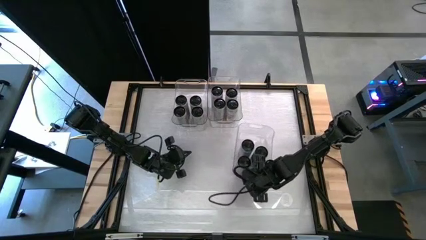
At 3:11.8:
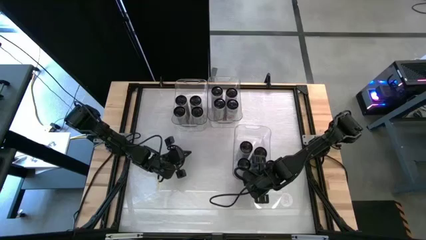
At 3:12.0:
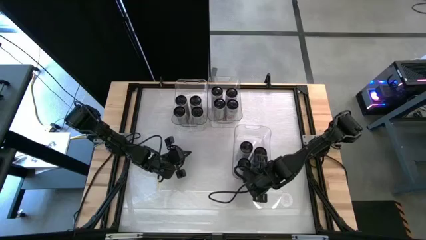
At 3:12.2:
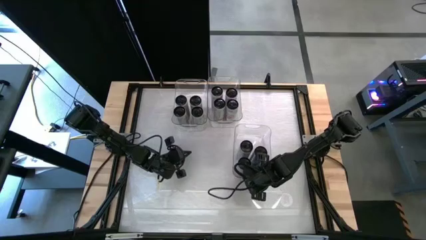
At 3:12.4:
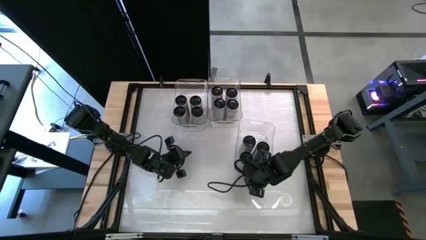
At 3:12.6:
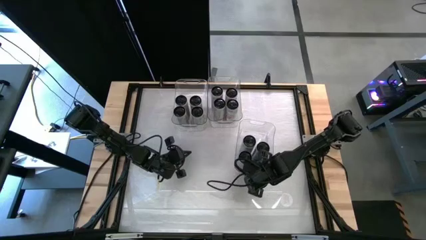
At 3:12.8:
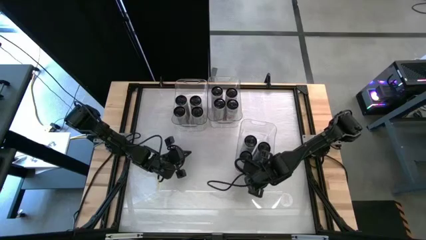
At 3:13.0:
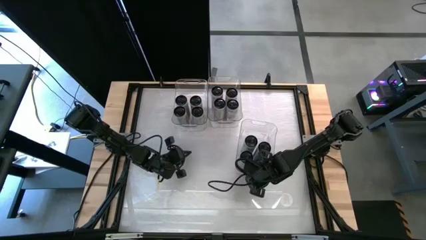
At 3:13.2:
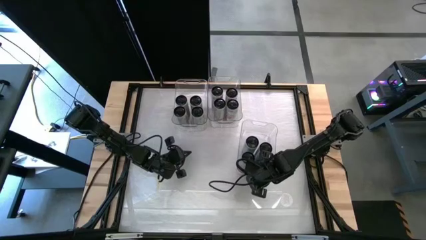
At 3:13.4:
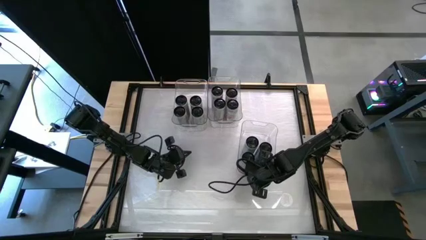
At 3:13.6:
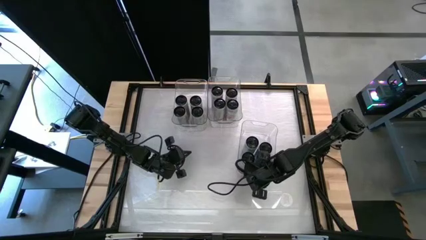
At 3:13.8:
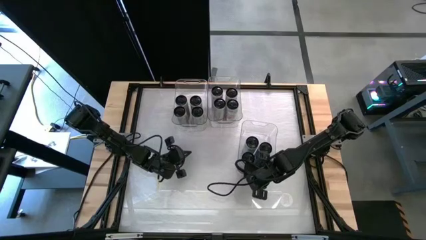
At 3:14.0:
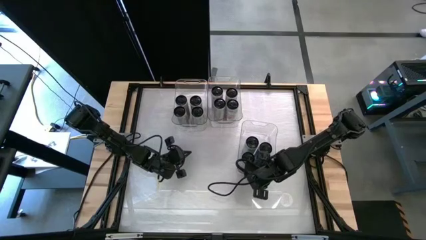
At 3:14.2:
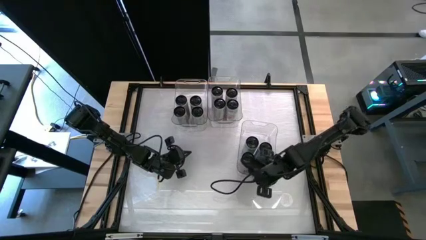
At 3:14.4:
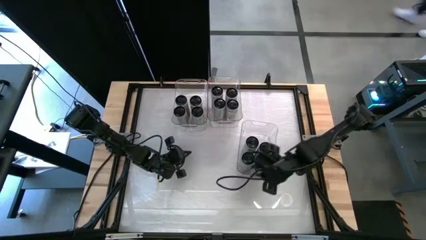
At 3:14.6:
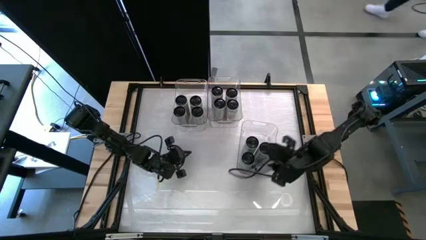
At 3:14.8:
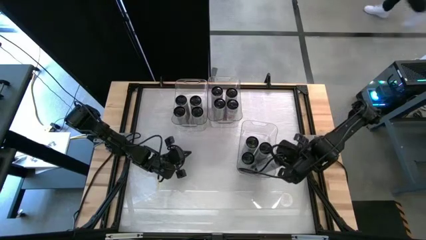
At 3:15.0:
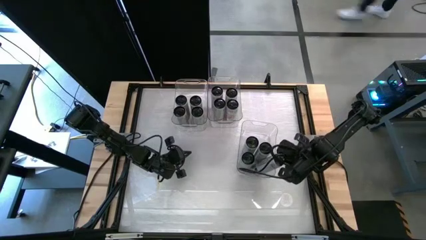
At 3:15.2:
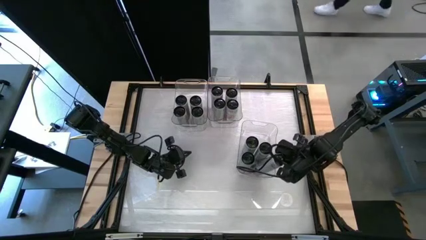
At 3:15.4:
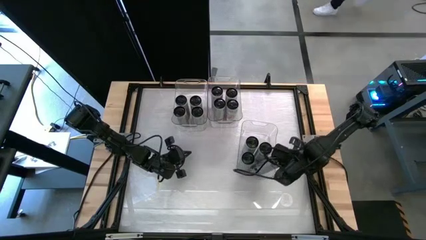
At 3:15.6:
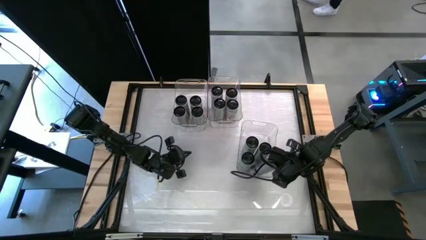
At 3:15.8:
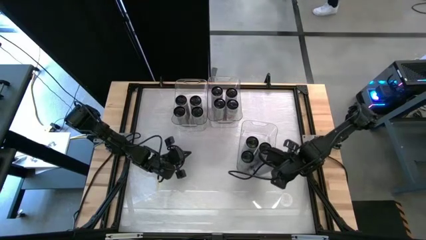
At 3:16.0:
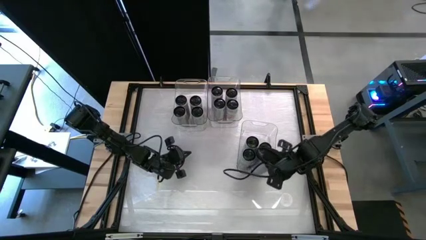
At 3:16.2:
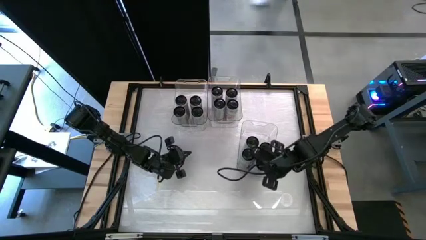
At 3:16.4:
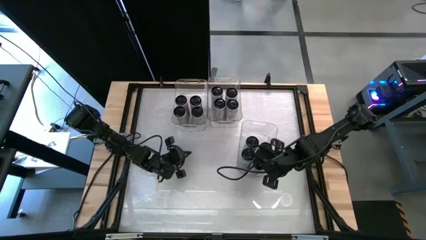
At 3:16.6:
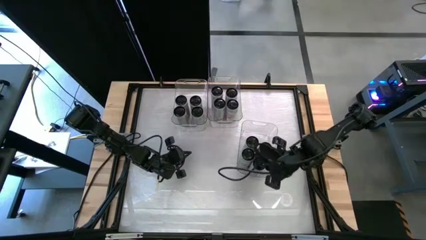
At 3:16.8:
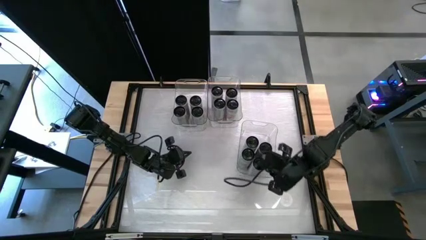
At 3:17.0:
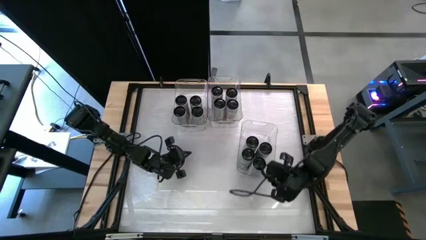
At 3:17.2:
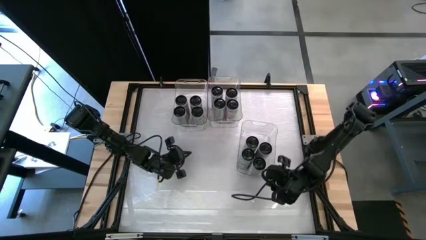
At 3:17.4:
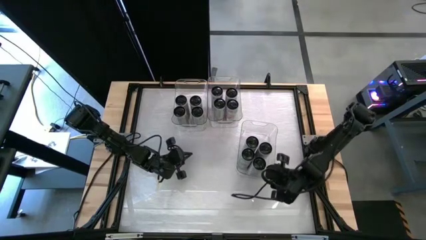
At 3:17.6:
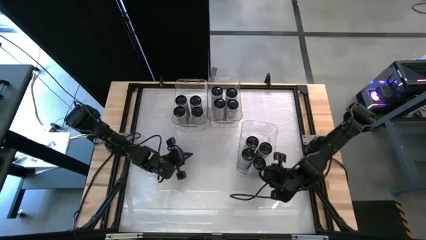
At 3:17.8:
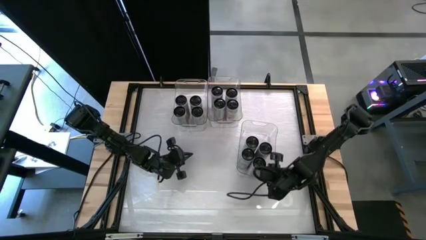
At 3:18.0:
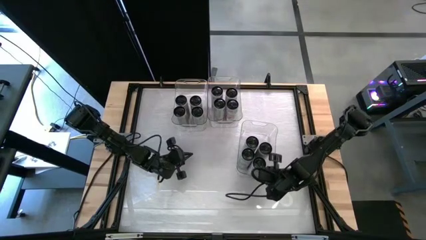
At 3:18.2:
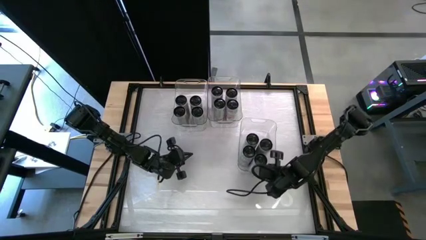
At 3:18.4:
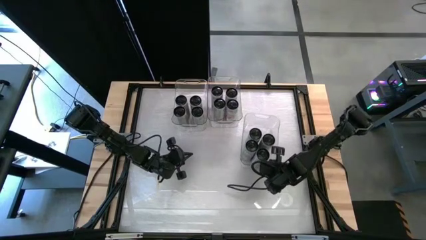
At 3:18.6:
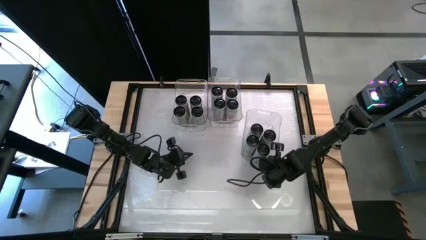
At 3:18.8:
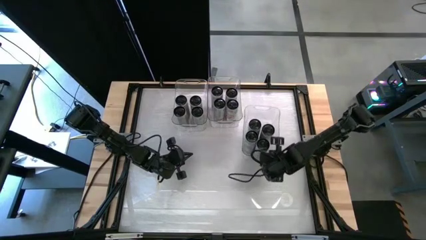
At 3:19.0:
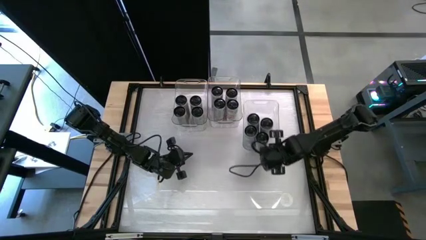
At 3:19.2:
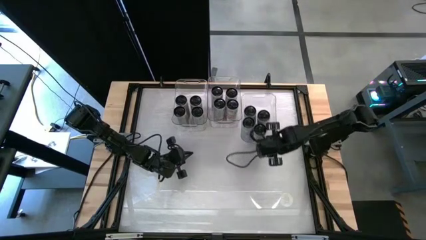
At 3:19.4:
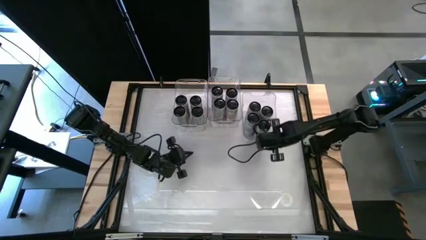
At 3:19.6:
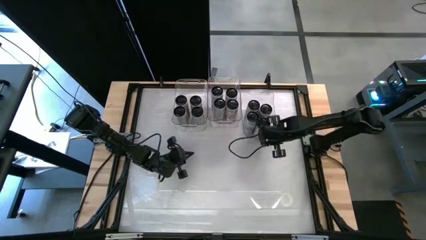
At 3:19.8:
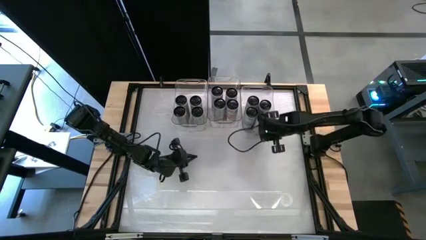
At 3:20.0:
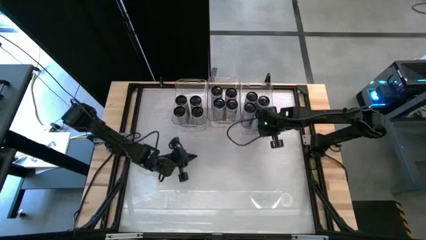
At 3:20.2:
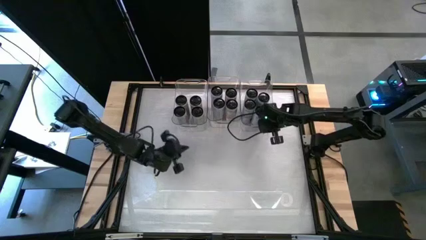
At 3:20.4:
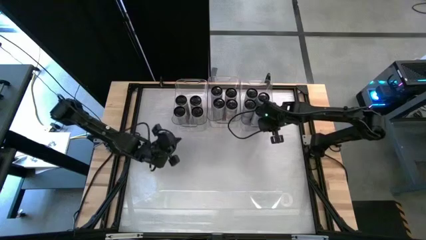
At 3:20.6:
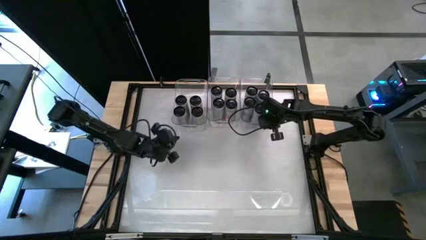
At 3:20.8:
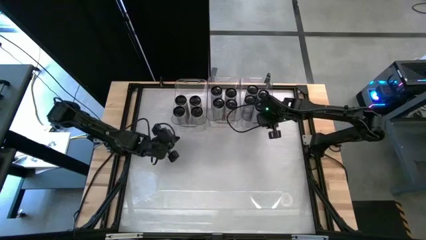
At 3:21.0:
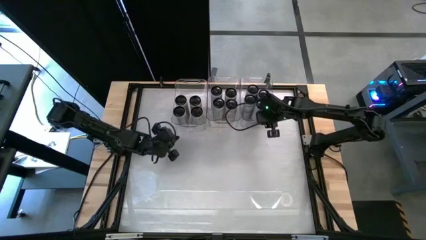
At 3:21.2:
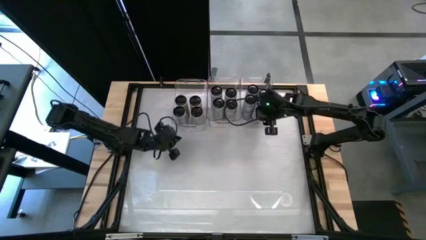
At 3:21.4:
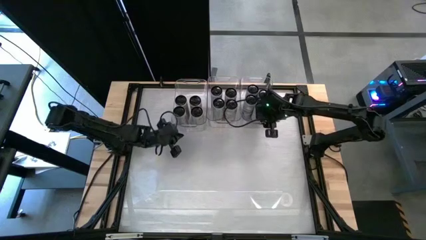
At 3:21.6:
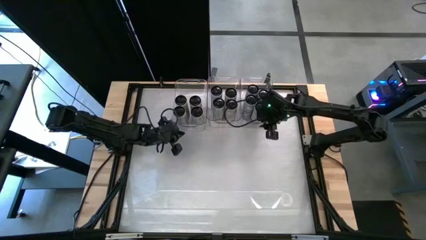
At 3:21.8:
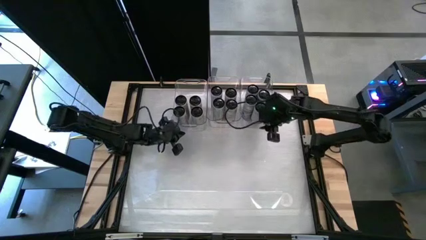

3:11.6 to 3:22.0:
Task: Sort soda cans
Adjust the right transparent bin

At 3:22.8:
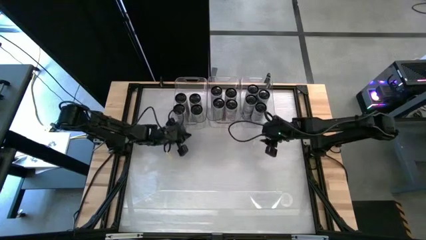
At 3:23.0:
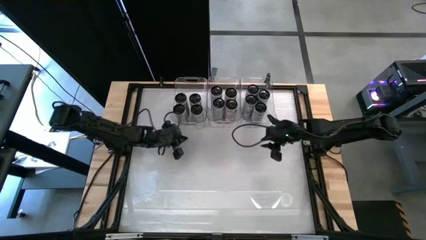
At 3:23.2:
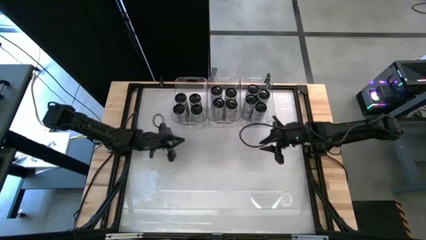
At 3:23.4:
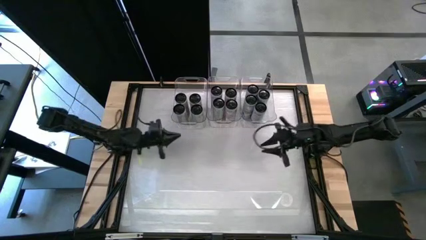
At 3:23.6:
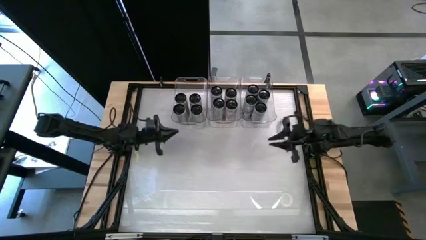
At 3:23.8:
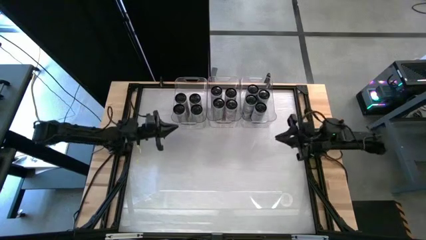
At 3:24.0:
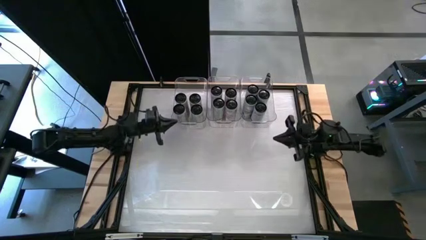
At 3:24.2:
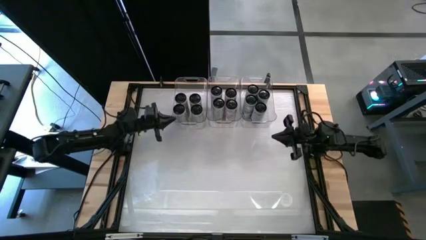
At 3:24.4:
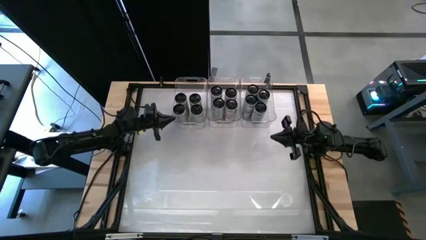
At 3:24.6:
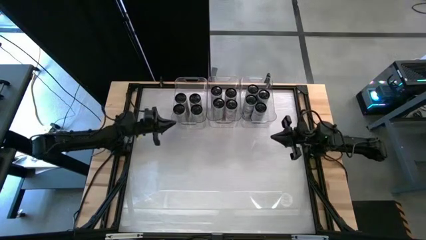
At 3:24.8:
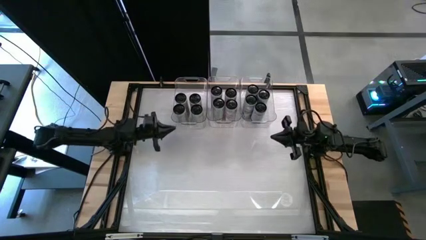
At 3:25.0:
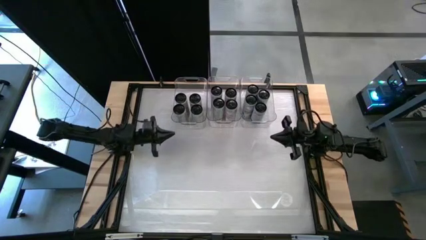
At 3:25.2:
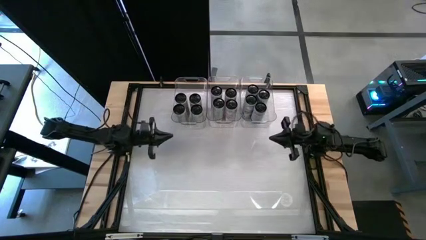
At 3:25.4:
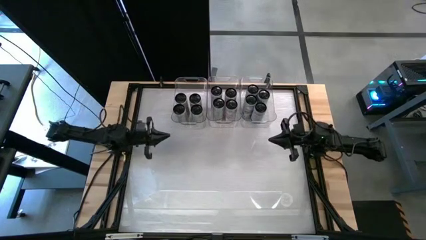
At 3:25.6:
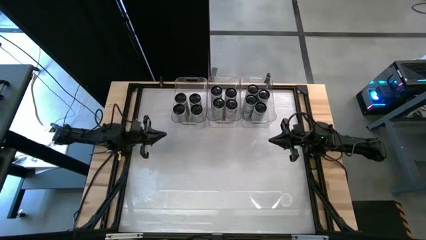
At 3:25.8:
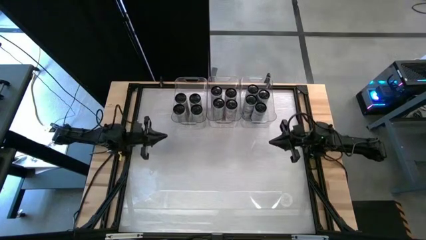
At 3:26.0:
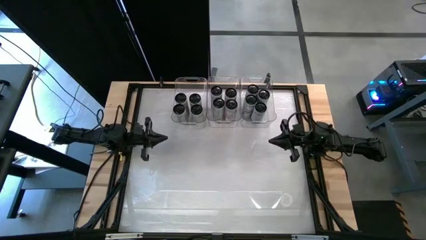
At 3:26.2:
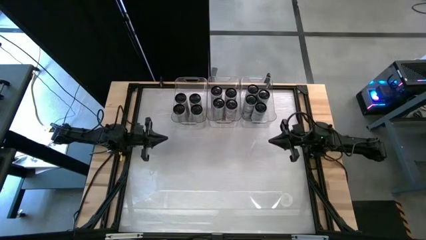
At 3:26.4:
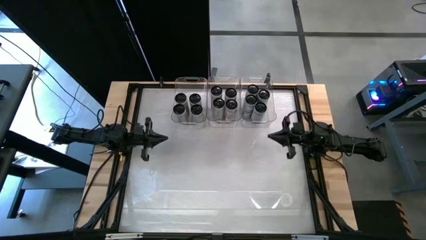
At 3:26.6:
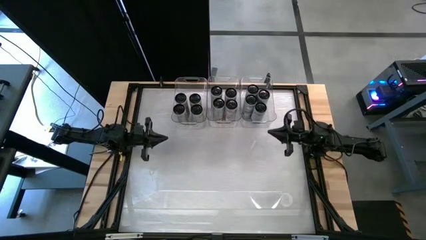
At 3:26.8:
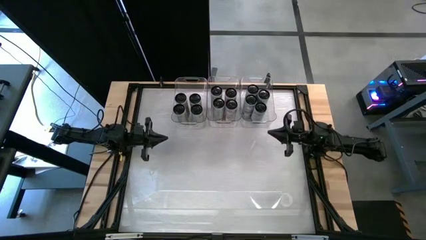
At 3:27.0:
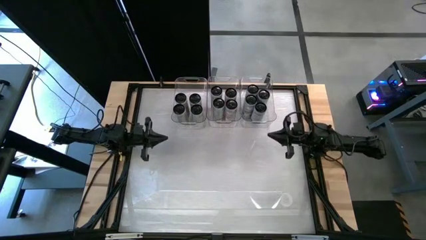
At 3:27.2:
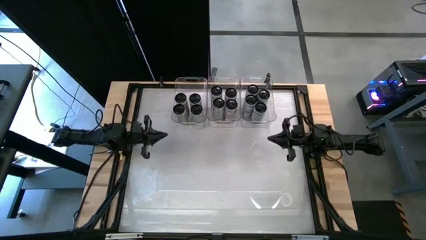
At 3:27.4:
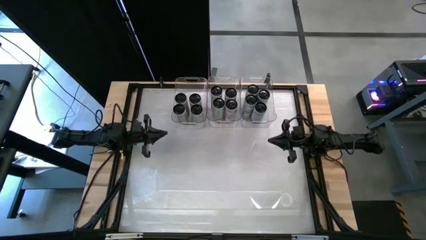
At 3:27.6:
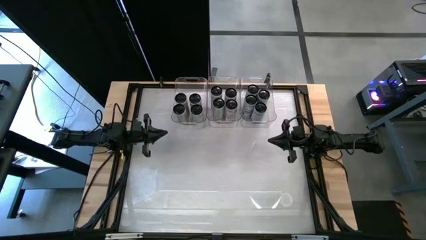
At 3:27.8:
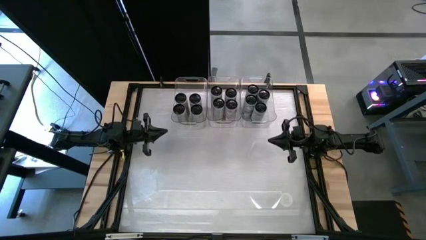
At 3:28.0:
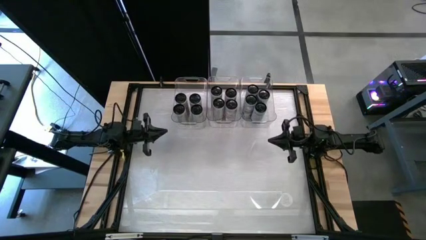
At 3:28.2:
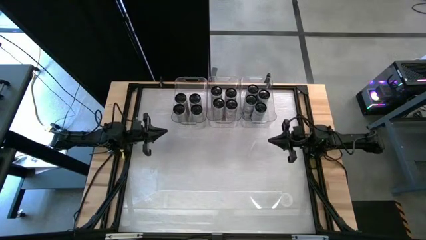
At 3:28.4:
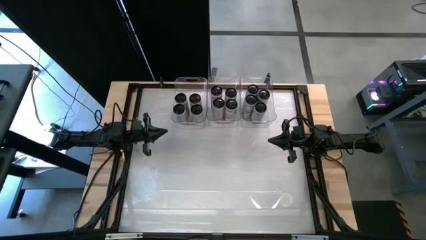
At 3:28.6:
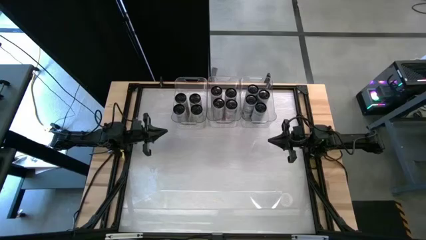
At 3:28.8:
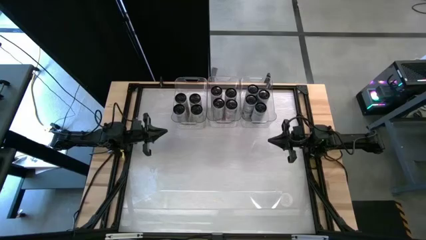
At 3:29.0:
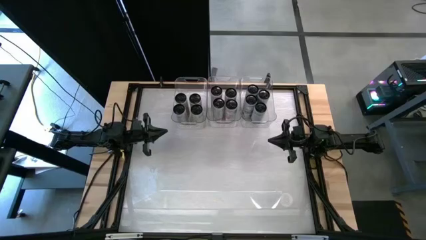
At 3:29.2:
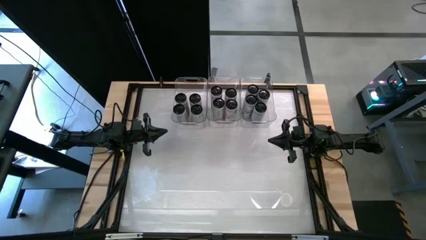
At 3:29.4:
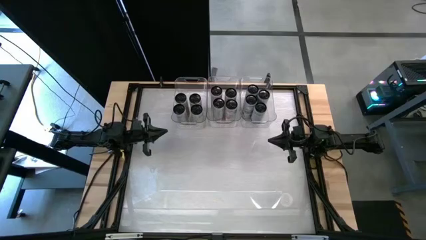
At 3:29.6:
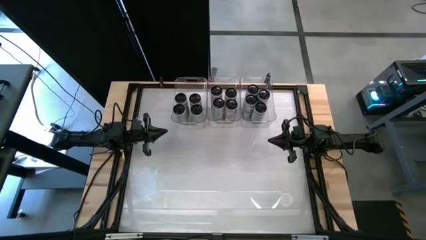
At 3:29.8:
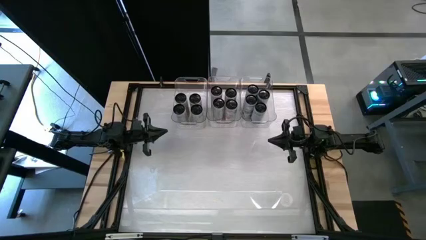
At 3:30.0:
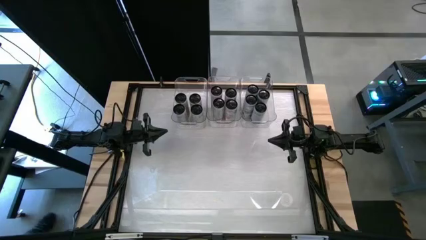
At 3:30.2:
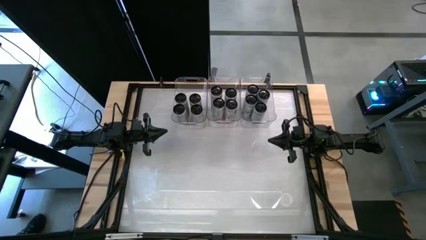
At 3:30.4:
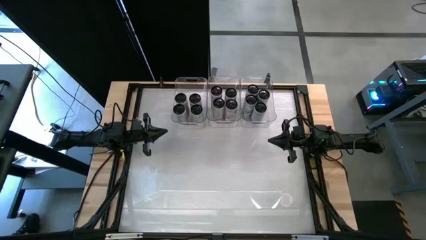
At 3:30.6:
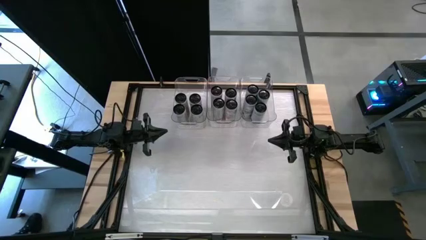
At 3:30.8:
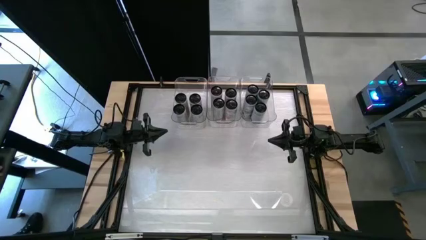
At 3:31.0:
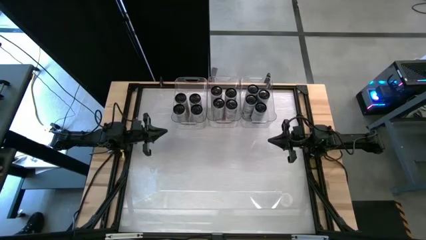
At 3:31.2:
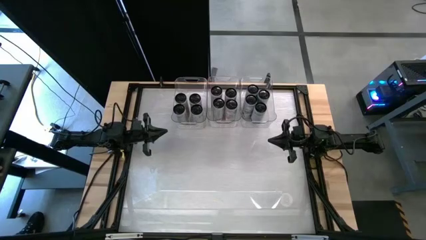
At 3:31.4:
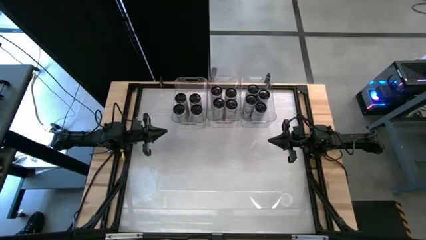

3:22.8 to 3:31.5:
Return to Home Position
